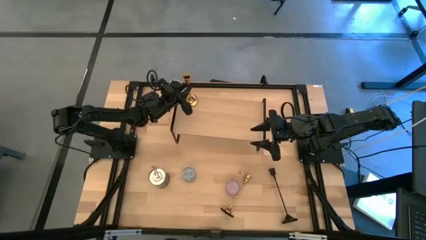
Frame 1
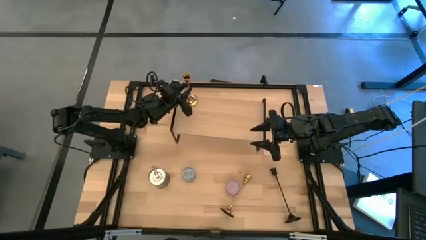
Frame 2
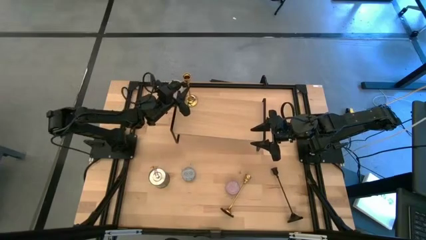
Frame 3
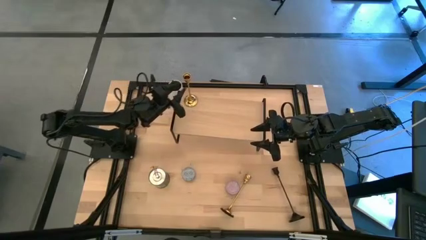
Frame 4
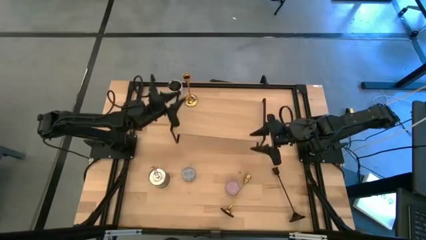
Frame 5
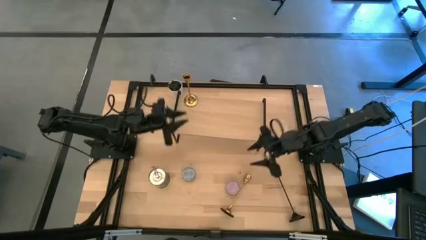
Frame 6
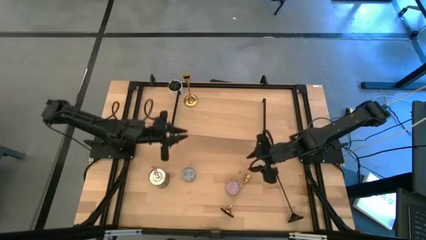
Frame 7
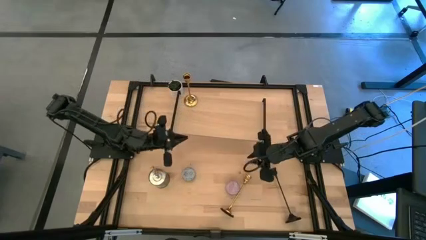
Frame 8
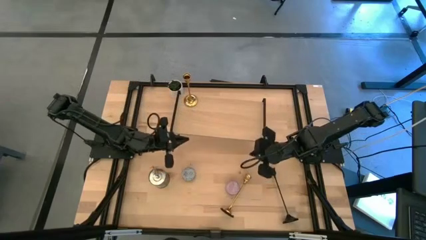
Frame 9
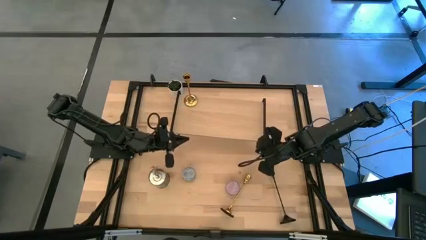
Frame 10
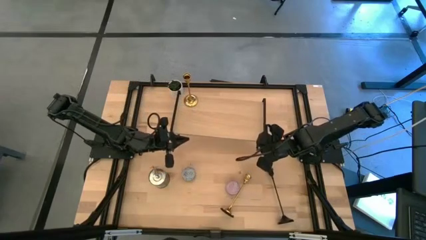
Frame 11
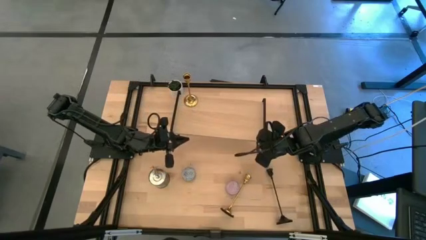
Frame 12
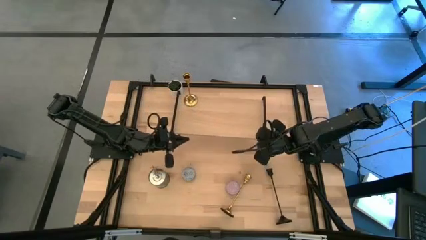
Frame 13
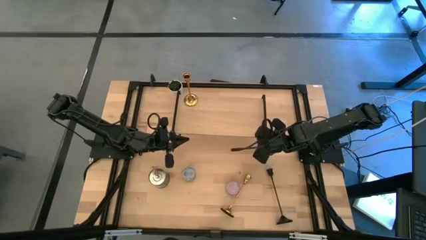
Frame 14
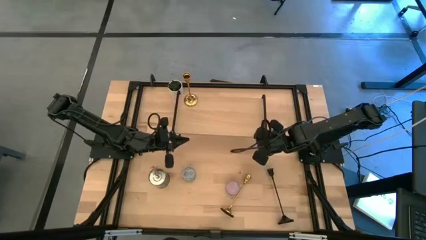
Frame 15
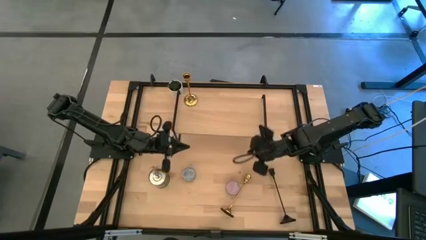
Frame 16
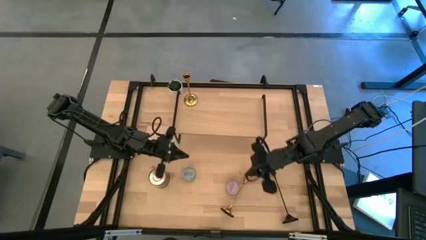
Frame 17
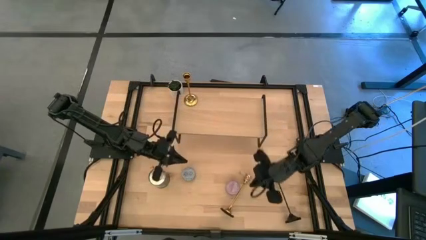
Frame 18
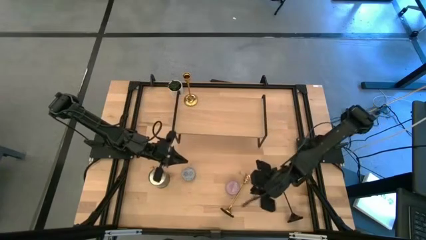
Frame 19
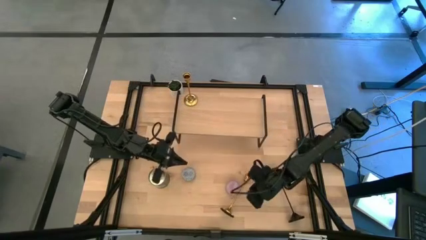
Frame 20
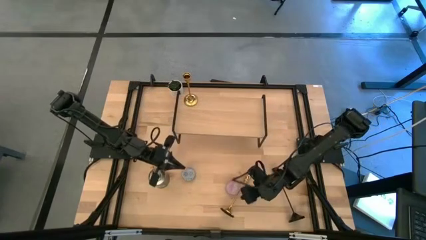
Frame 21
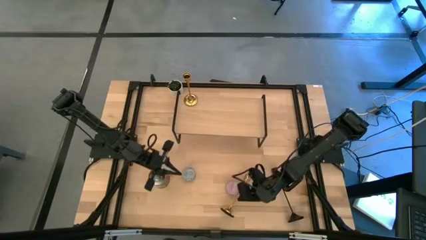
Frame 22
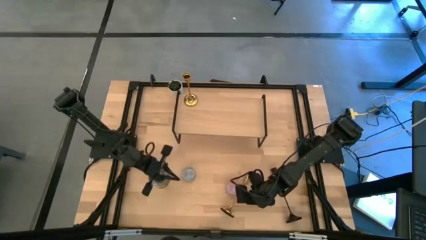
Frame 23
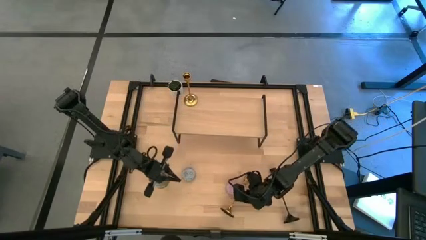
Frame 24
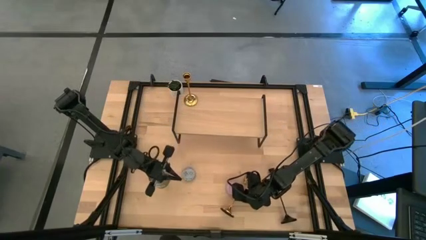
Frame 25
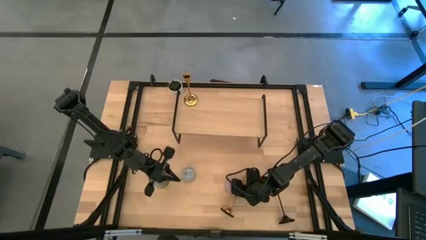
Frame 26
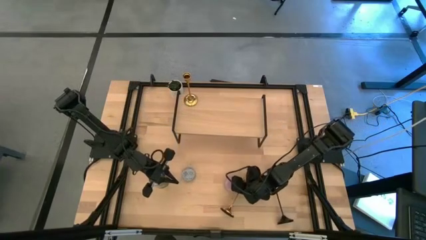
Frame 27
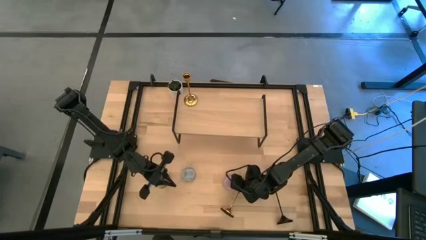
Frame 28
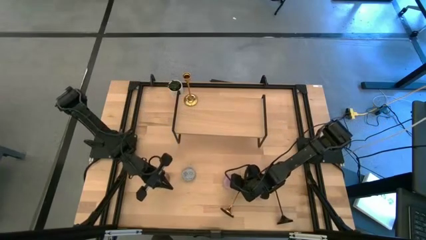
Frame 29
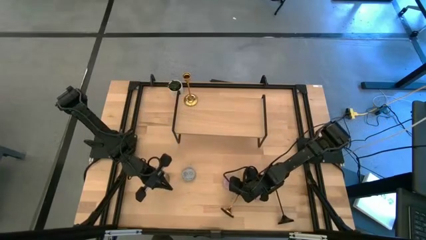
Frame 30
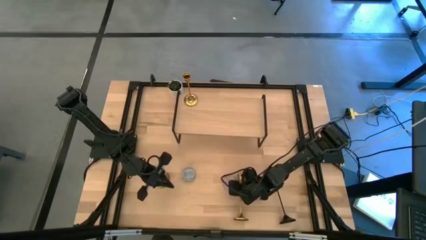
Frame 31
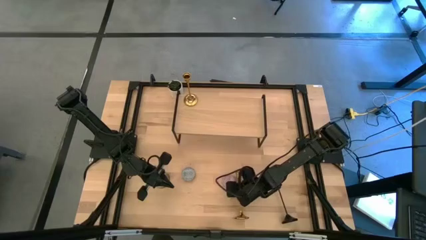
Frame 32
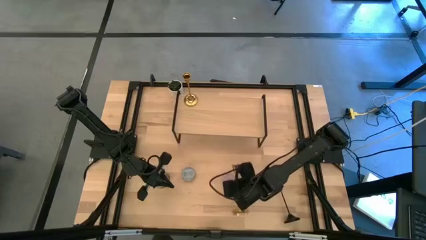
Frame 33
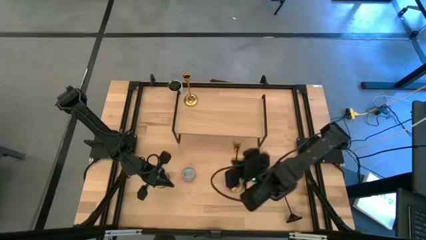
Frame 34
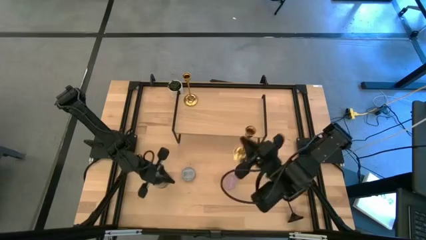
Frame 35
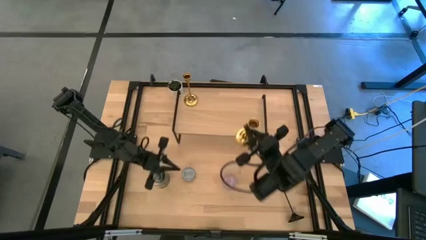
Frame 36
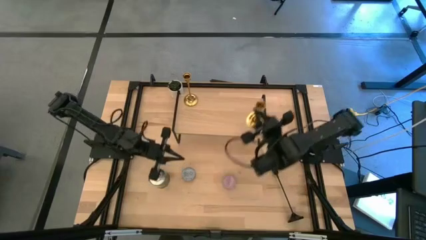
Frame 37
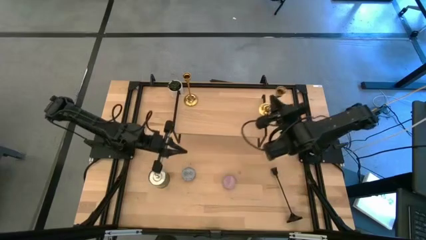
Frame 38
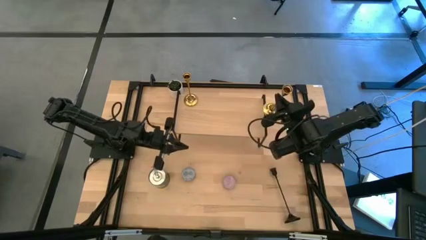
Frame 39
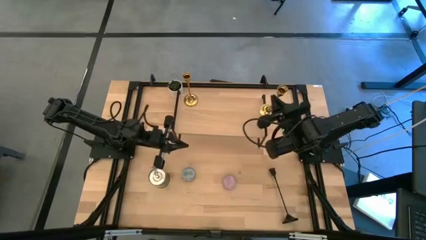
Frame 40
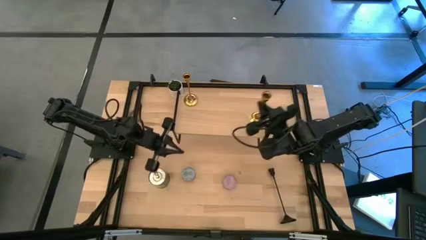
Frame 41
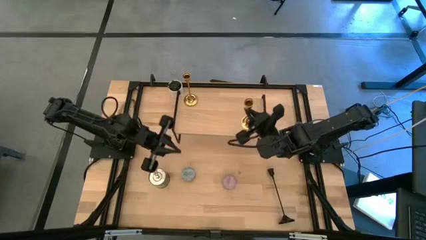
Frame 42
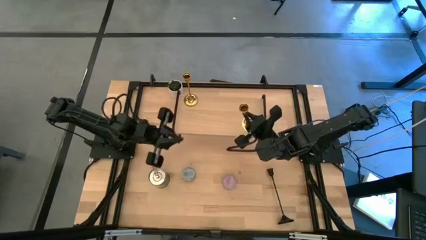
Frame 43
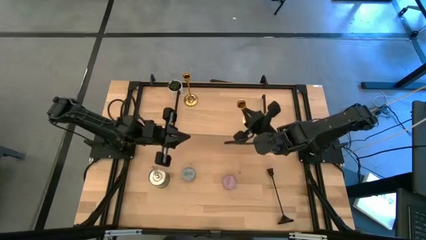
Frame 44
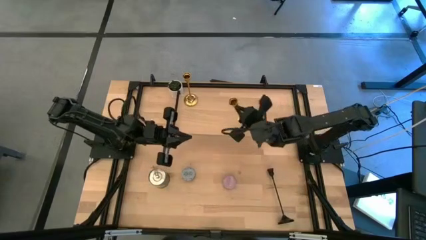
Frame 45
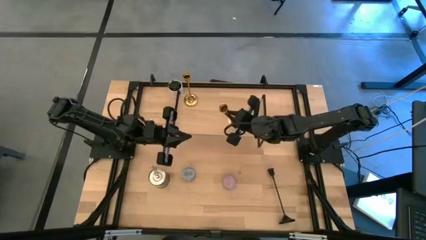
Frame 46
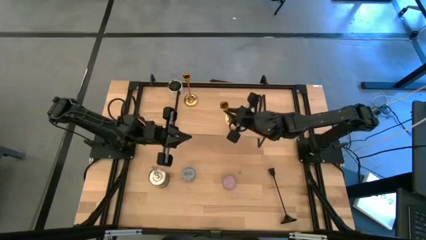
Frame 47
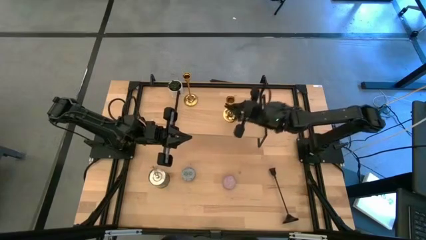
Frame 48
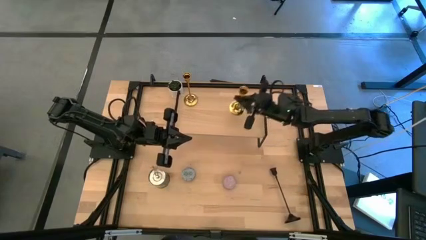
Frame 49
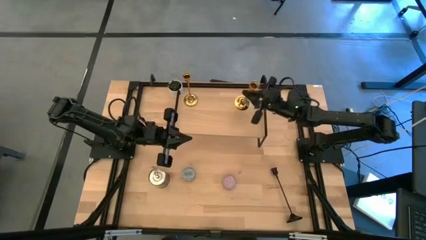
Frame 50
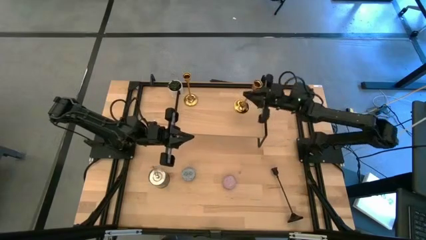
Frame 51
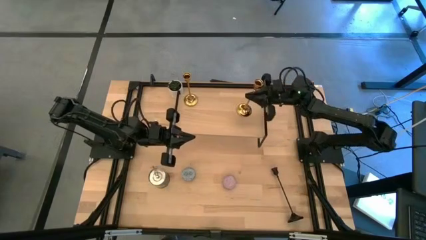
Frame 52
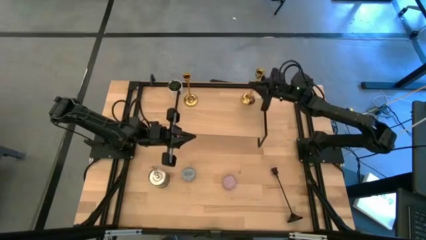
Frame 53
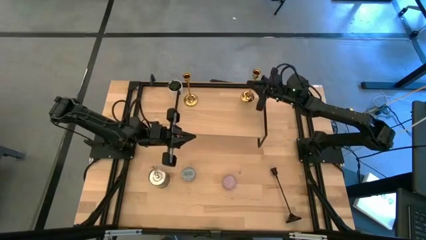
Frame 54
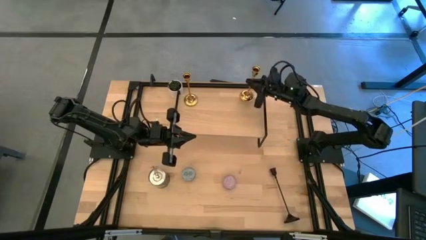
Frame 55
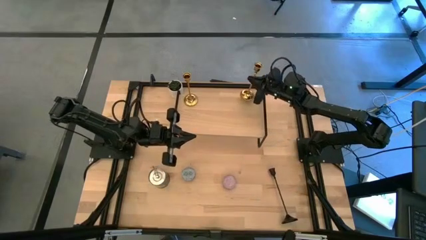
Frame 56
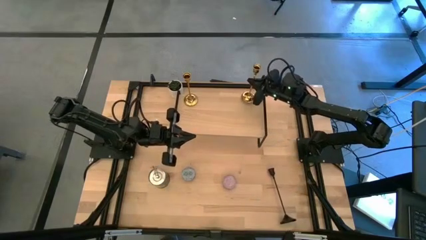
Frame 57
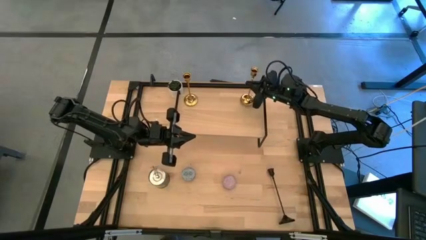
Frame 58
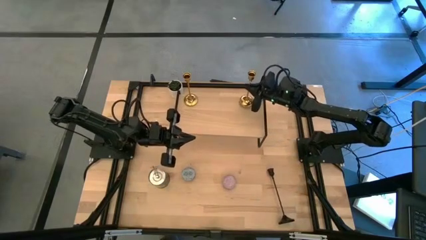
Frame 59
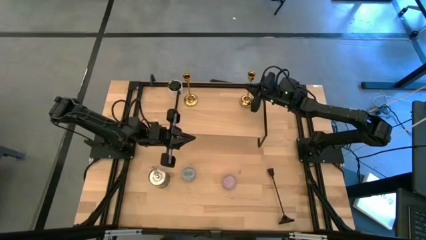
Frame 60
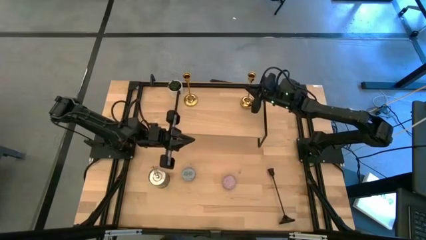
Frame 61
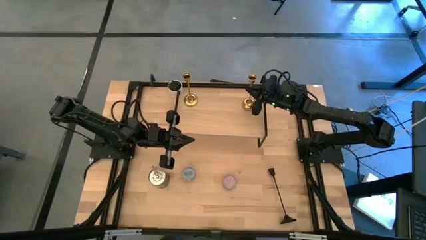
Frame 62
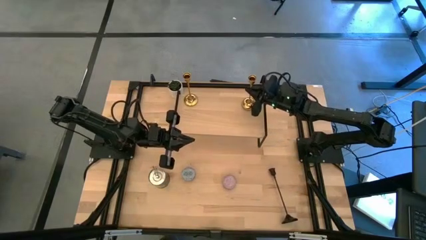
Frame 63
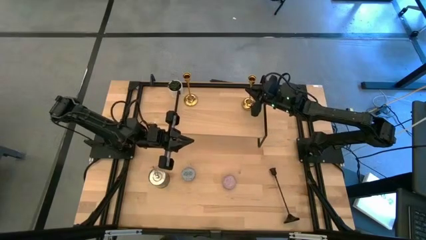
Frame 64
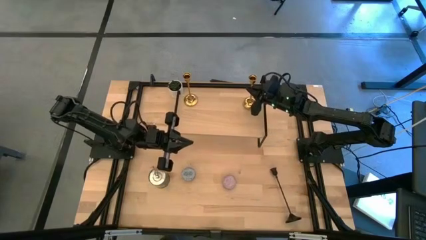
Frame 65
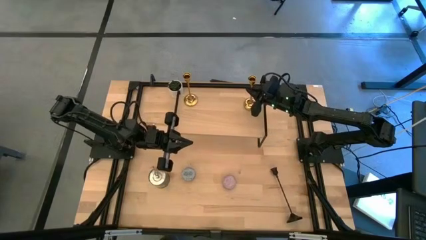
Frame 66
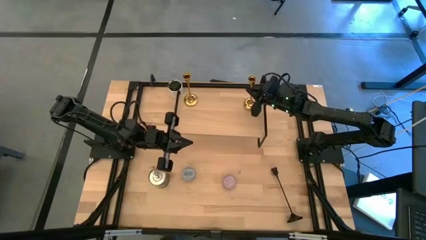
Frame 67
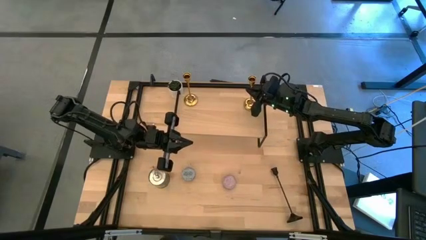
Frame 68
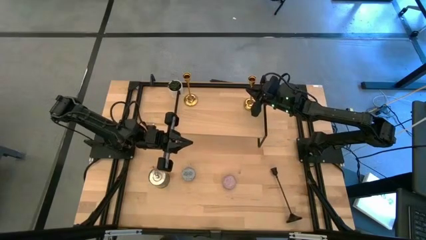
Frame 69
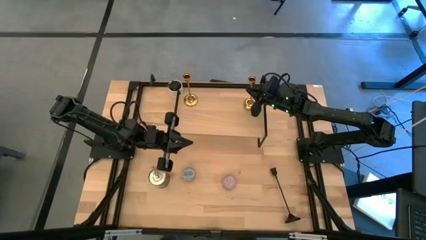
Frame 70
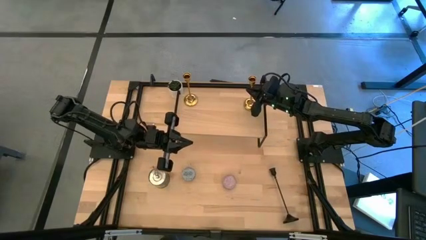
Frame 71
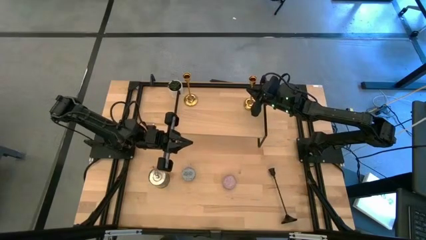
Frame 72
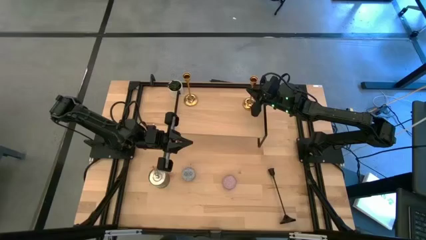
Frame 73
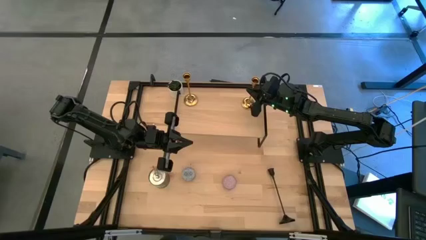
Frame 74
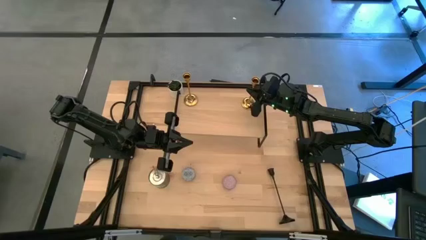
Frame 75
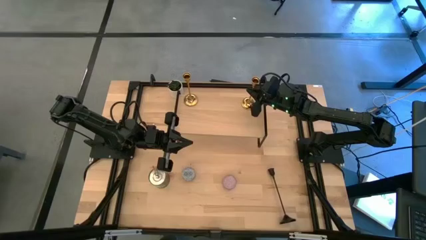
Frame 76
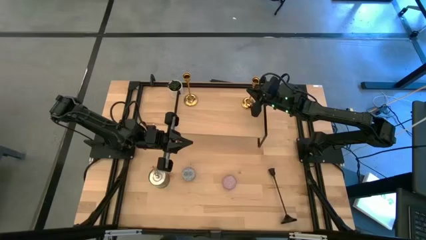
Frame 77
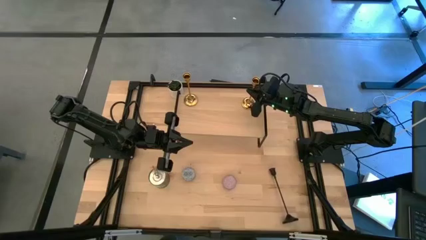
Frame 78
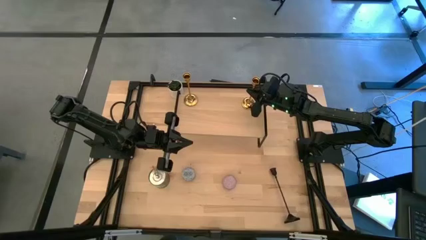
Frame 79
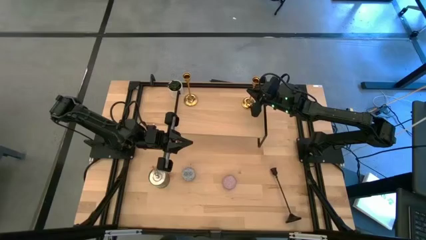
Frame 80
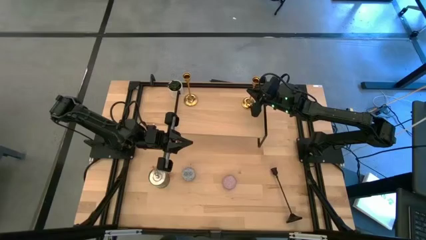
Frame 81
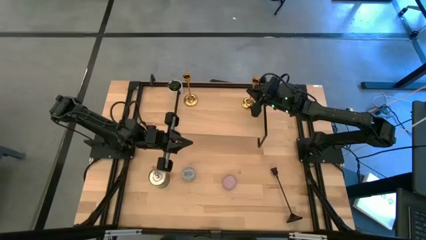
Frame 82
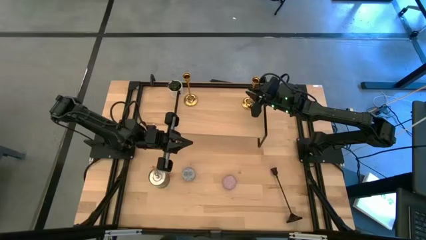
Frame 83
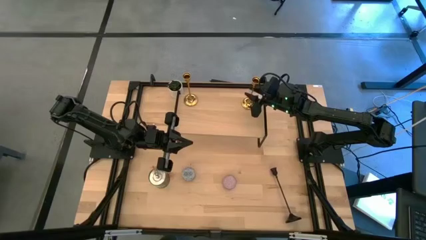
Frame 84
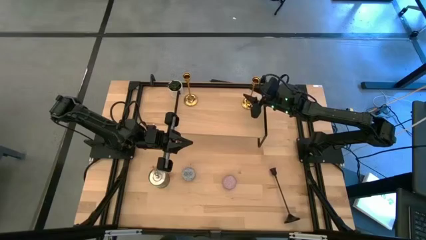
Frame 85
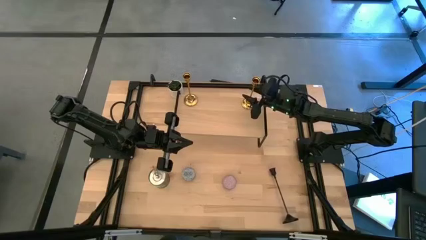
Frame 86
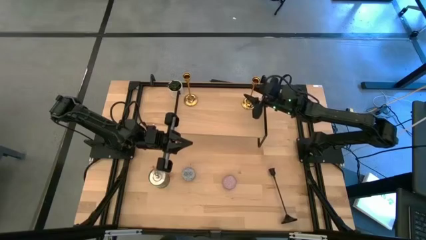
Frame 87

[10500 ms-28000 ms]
Task: Pick & Place candle stick holders
Put the gold candle holder on the shelf
